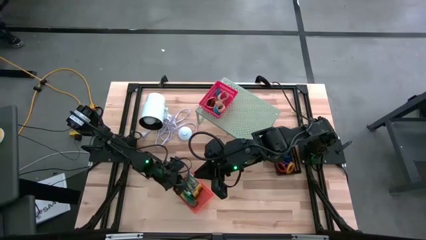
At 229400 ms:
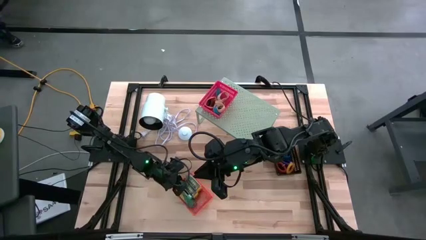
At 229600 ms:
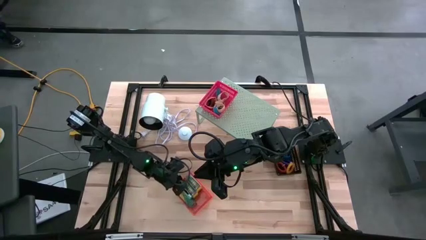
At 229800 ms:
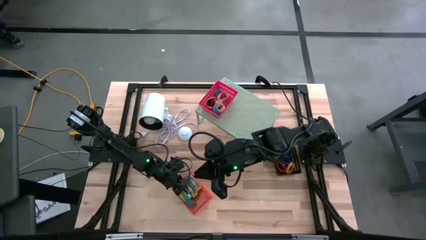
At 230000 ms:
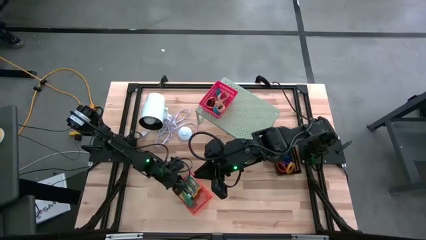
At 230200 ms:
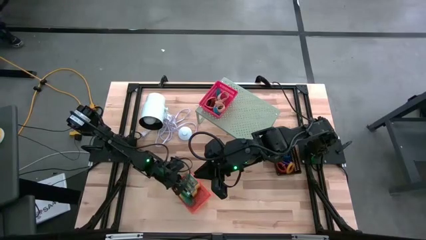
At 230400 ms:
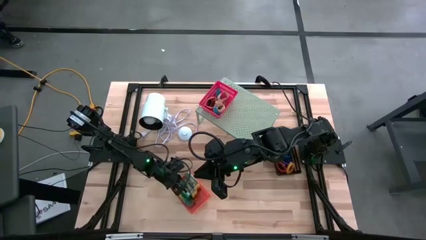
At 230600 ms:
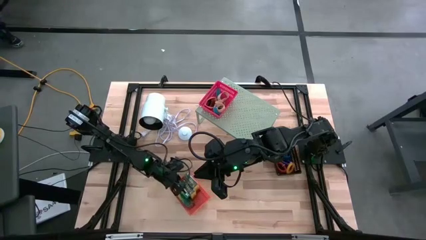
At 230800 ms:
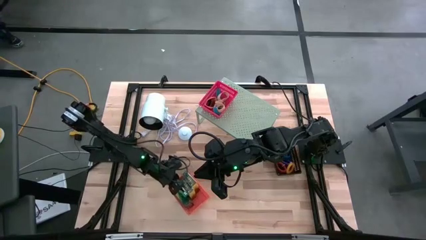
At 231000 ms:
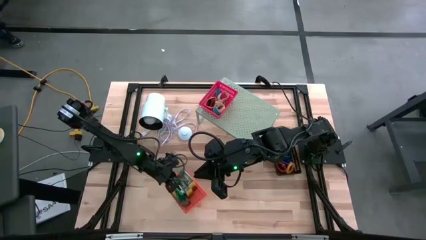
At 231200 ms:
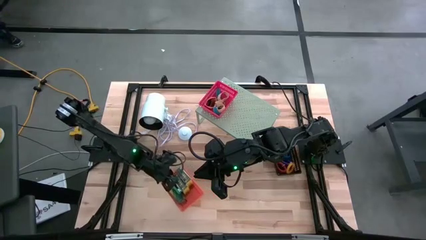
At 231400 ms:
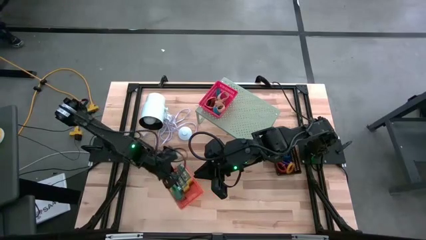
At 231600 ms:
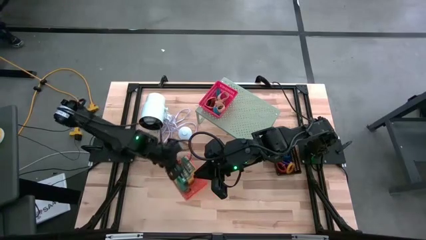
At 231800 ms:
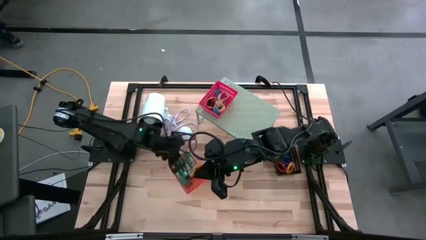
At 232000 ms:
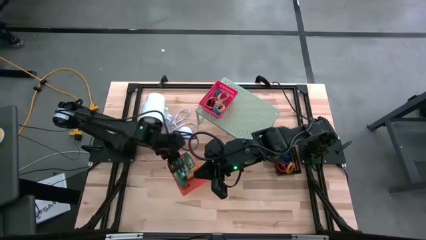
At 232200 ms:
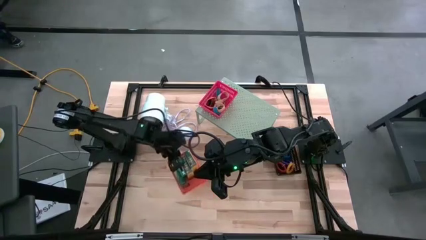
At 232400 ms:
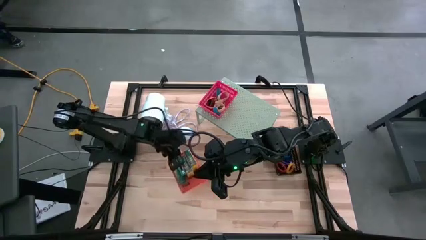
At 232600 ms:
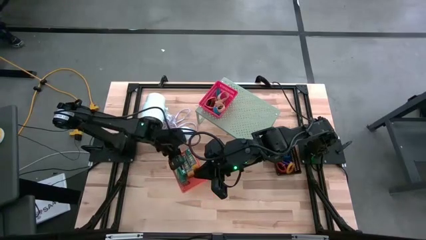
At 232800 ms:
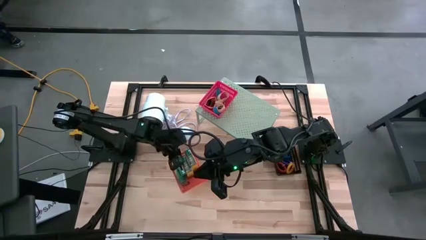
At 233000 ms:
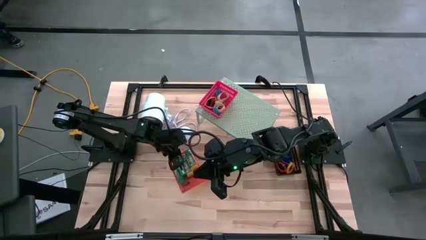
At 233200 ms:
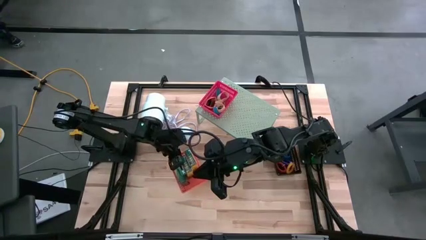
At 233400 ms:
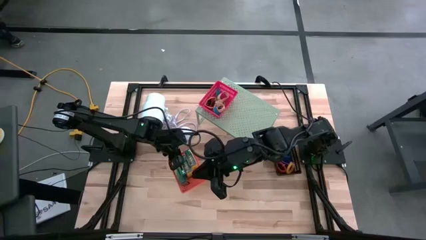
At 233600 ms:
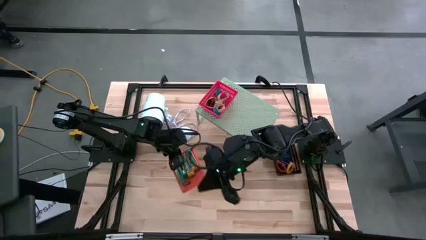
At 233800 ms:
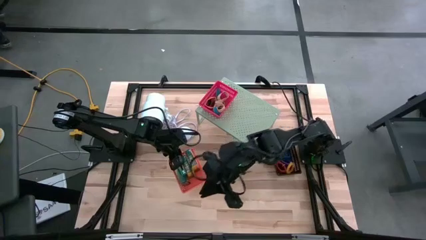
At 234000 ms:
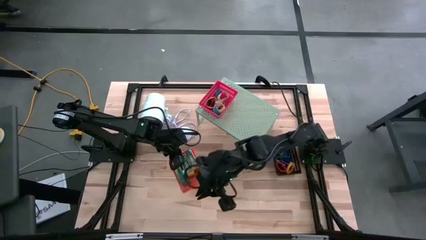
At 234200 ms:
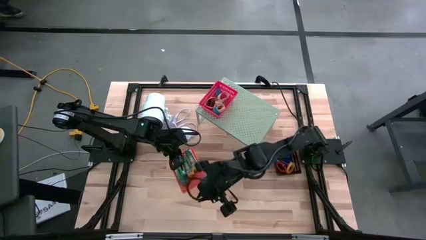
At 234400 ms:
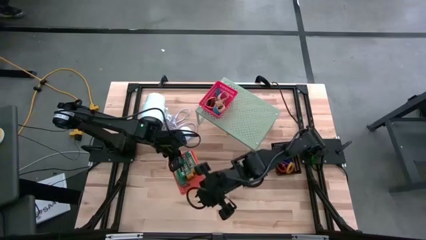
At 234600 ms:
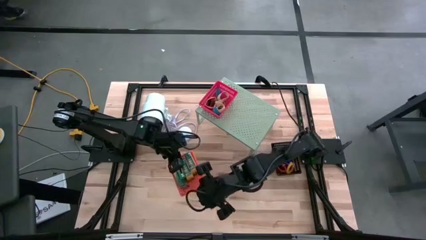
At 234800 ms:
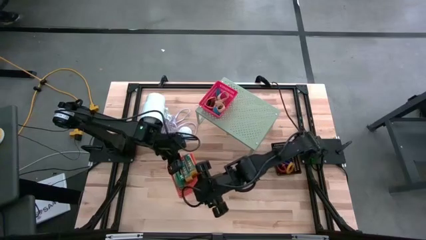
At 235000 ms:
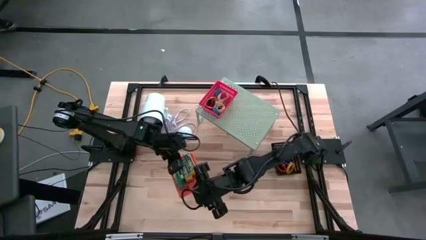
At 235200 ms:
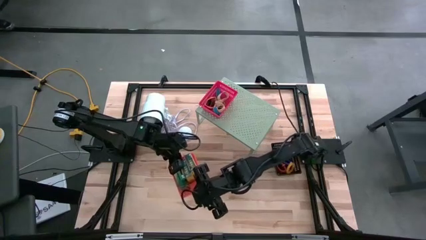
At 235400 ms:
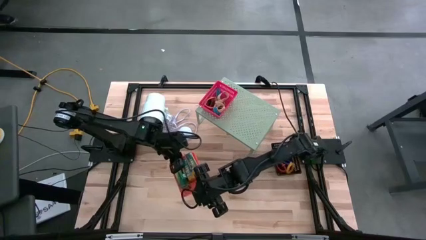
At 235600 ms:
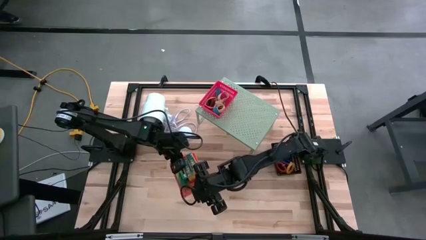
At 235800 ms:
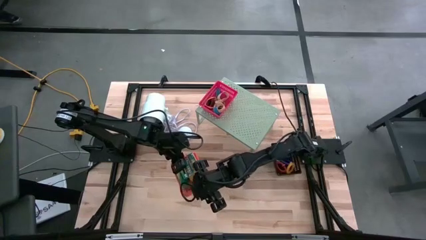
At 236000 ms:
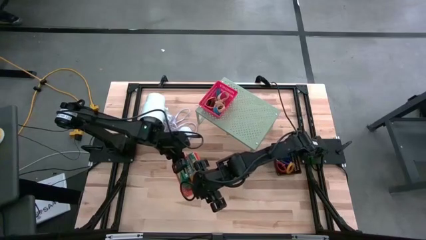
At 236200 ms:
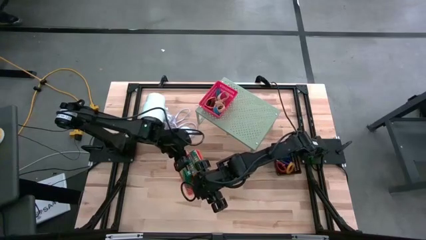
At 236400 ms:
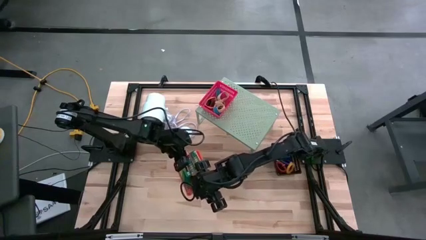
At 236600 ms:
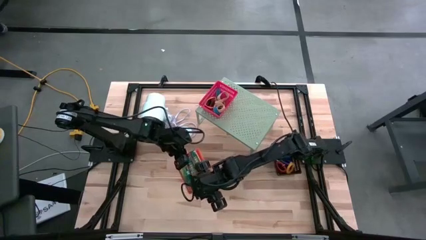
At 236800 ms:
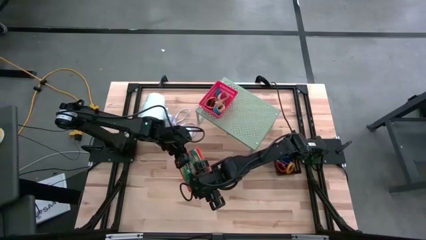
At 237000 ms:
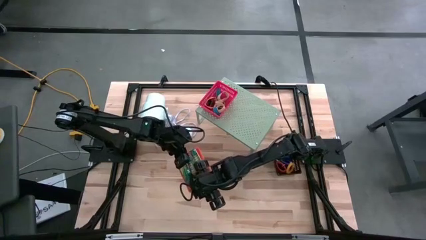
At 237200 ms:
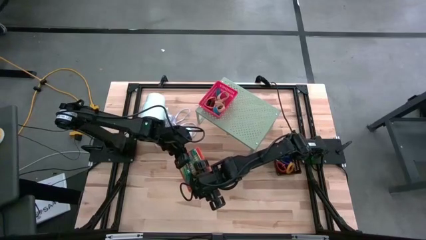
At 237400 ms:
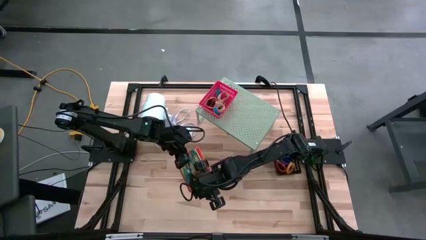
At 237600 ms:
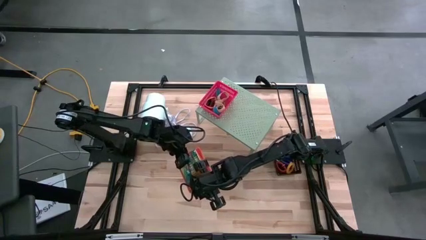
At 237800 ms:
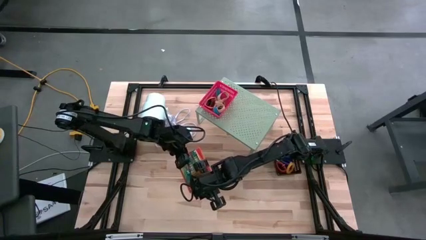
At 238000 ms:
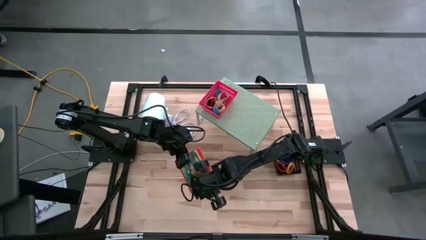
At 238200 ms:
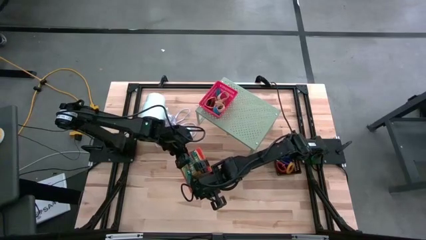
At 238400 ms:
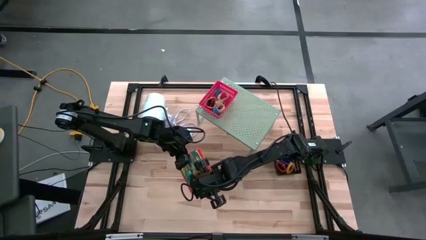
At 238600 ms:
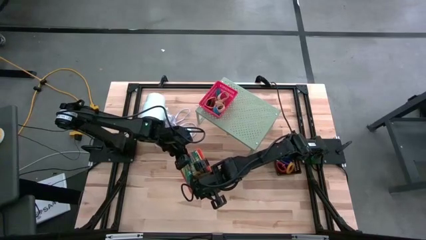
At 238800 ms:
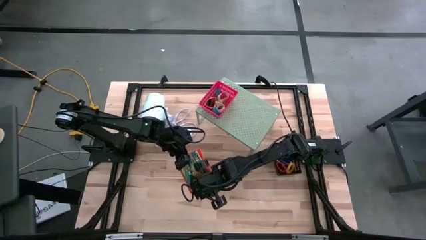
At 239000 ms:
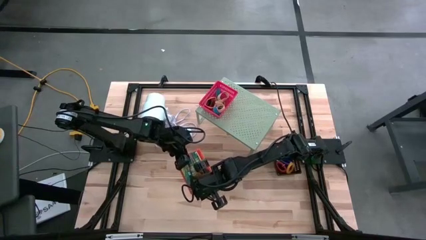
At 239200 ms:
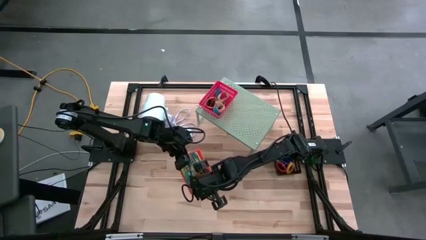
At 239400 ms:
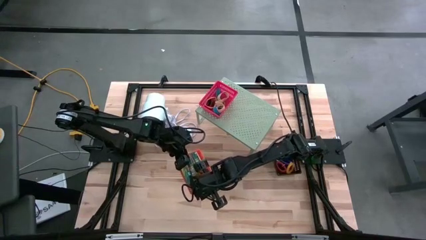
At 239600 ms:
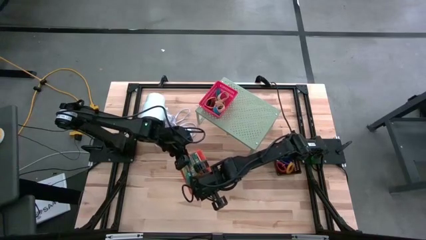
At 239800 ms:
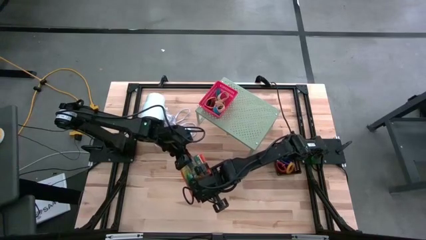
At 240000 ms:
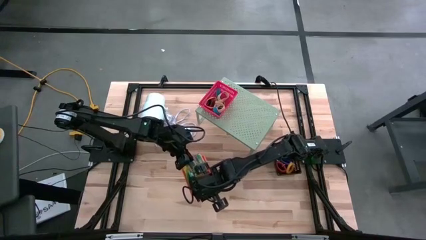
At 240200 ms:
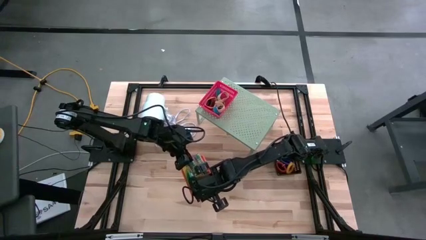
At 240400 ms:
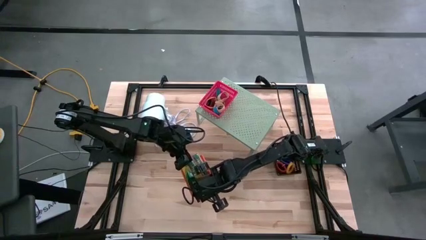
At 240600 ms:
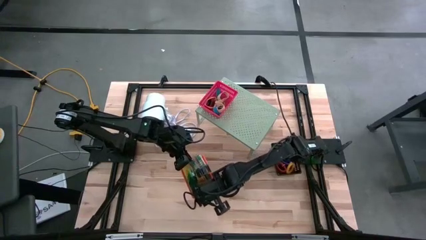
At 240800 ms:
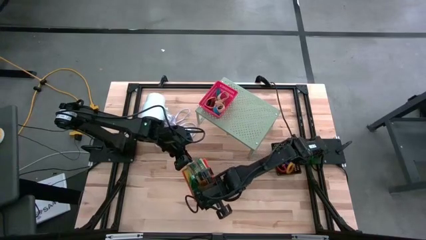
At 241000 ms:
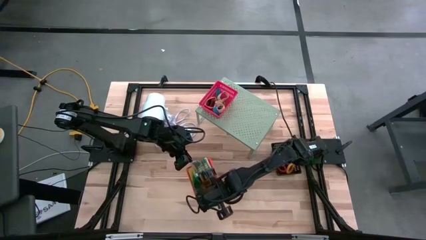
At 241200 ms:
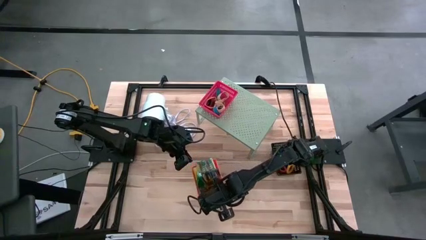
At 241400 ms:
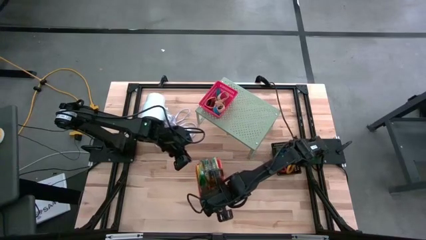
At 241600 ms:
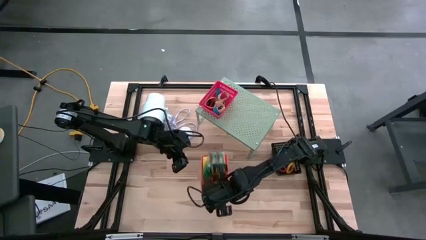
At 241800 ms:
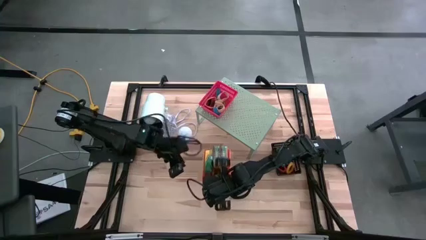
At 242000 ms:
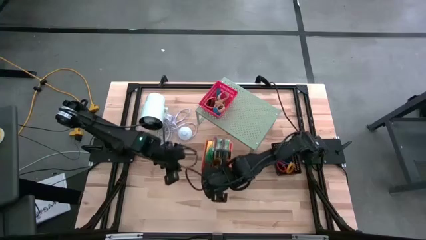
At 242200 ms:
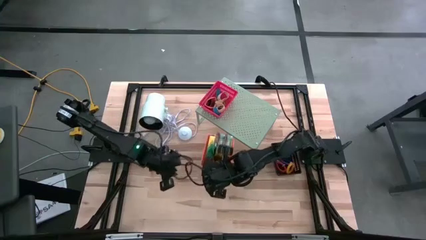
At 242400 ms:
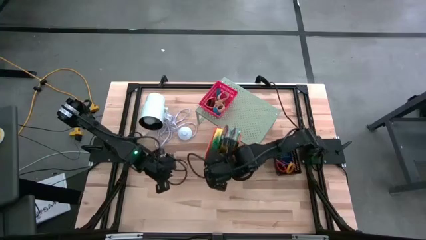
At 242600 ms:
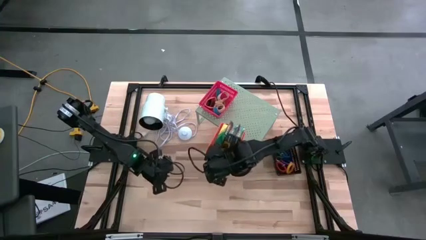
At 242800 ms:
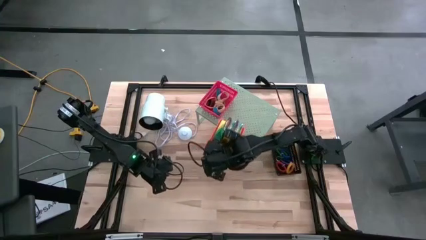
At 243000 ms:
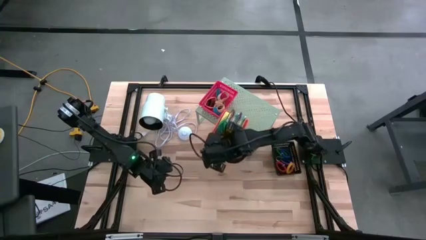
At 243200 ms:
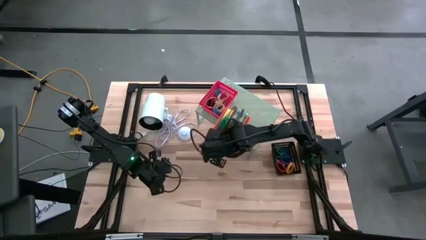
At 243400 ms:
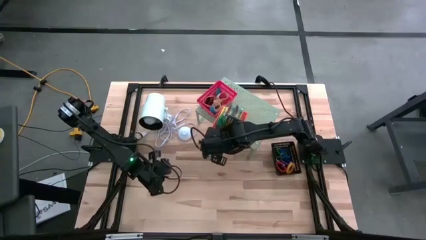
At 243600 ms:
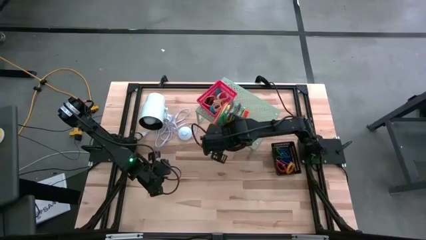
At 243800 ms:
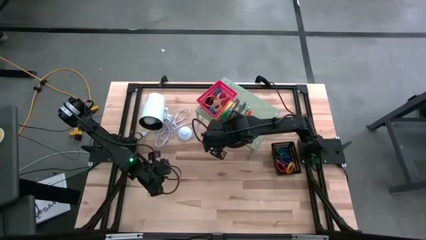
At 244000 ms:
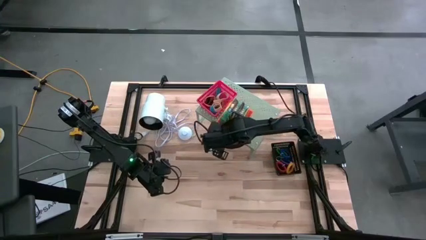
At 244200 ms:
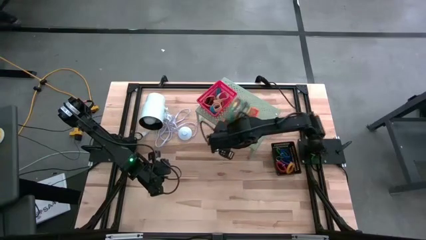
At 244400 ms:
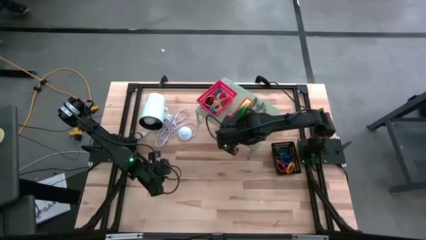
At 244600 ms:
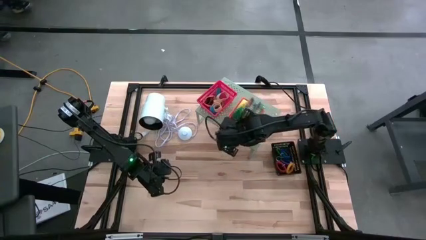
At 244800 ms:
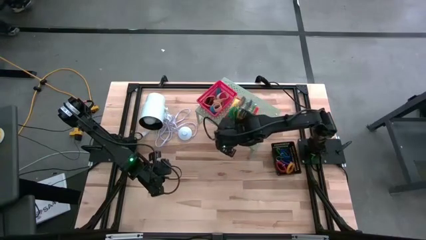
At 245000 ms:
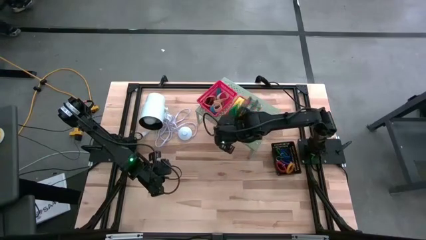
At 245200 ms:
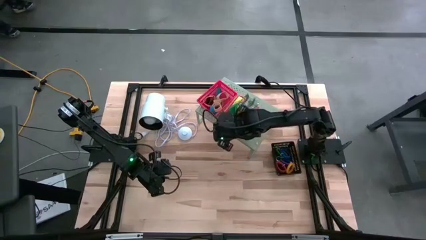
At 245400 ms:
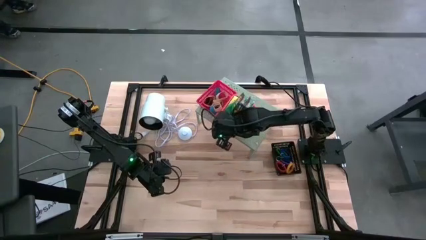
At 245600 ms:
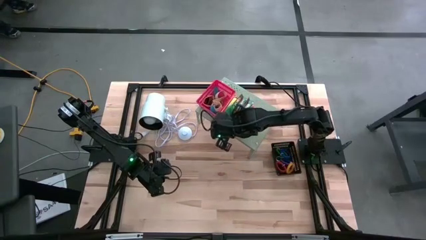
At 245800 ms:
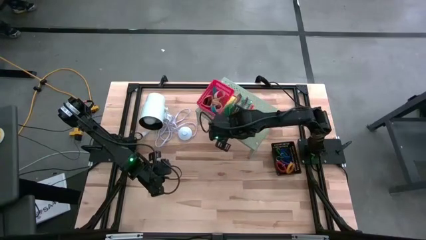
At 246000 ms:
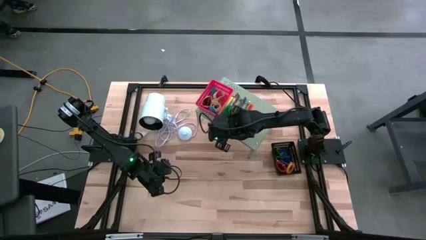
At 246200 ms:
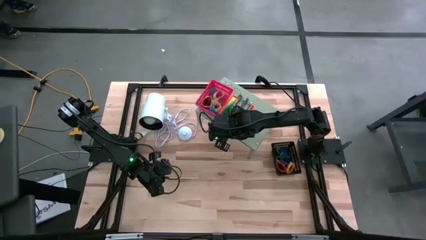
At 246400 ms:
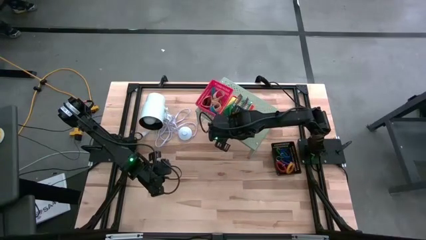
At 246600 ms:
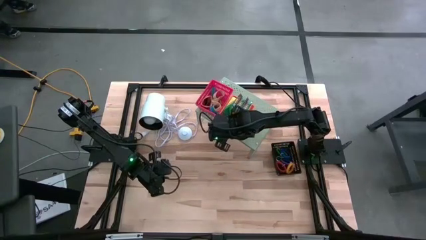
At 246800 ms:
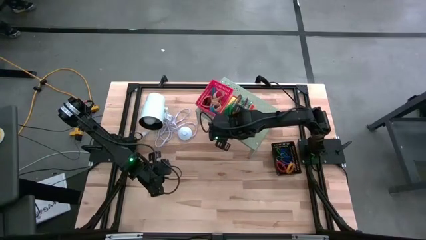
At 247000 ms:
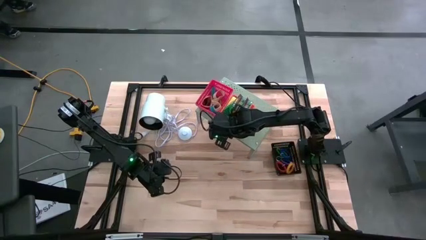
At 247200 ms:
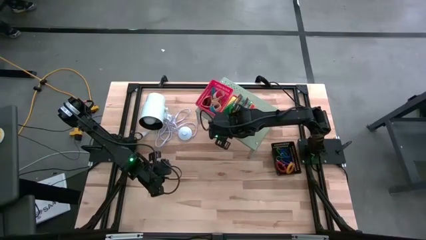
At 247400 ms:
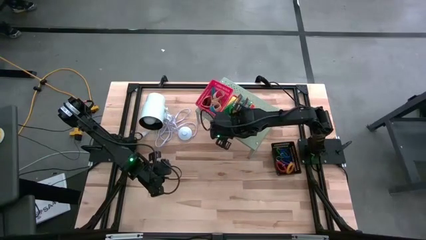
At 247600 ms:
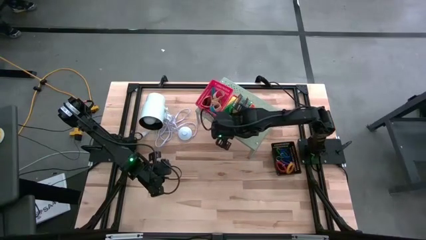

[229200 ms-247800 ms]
Task: Pick & Place Office Desk Supplies
Put the orange bin into the shelf
